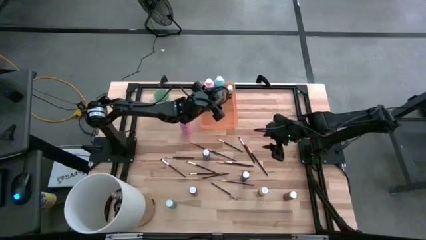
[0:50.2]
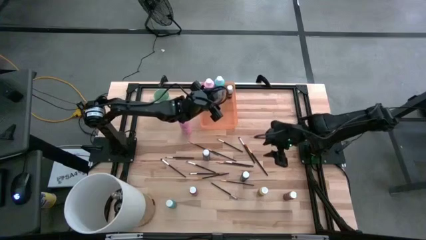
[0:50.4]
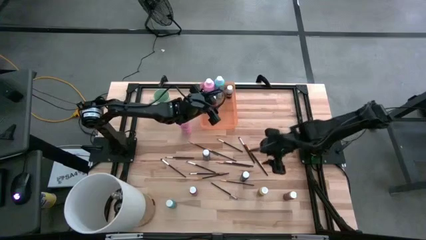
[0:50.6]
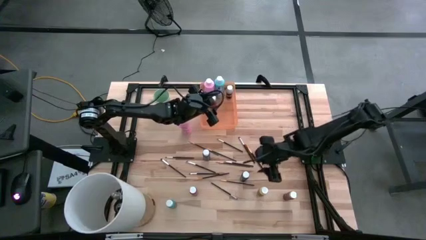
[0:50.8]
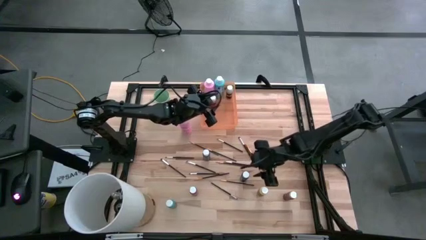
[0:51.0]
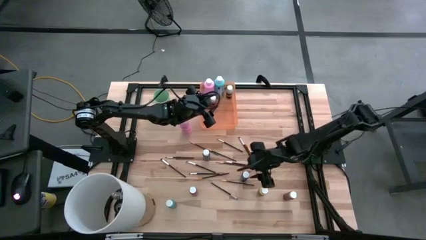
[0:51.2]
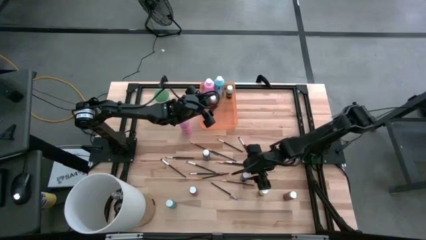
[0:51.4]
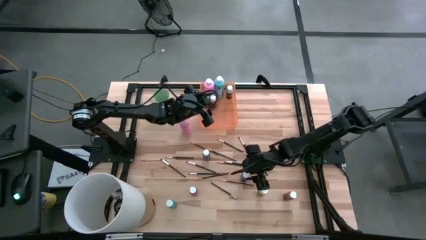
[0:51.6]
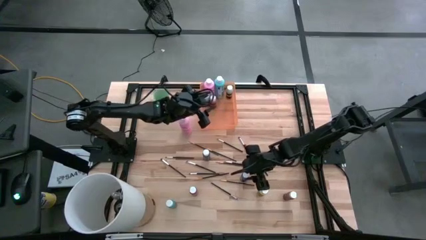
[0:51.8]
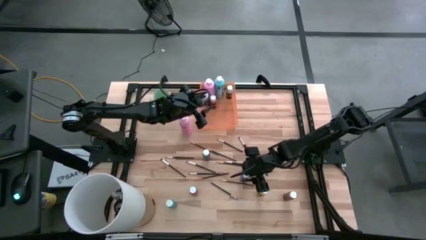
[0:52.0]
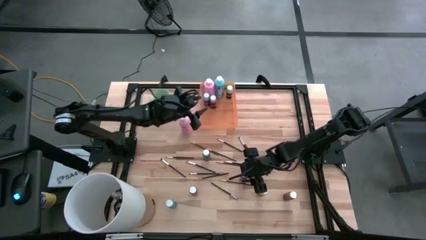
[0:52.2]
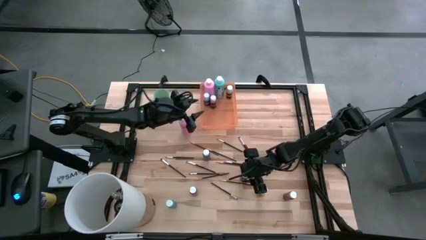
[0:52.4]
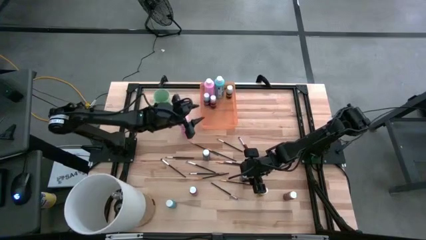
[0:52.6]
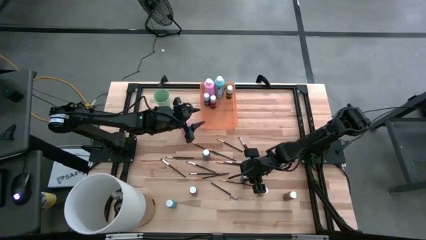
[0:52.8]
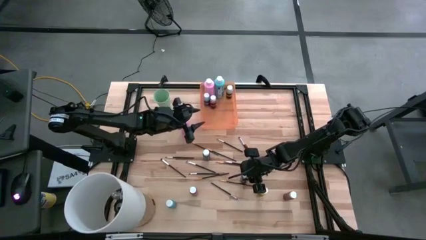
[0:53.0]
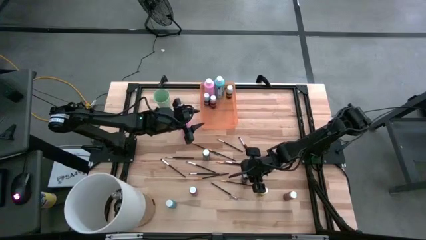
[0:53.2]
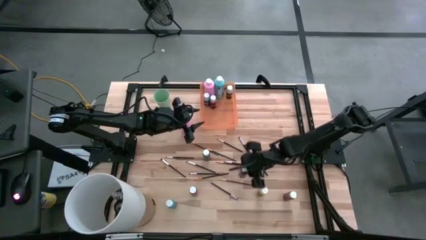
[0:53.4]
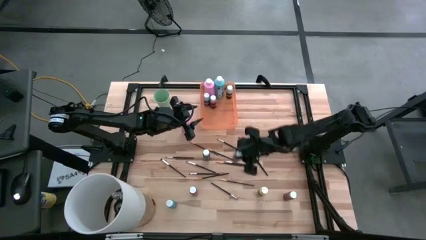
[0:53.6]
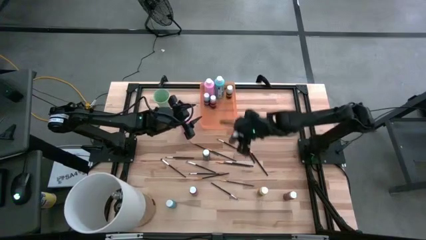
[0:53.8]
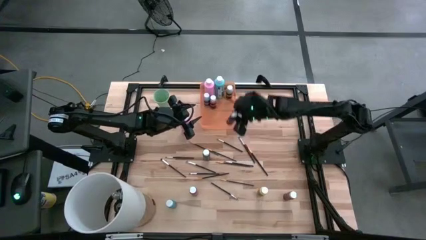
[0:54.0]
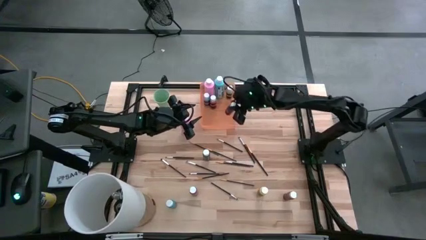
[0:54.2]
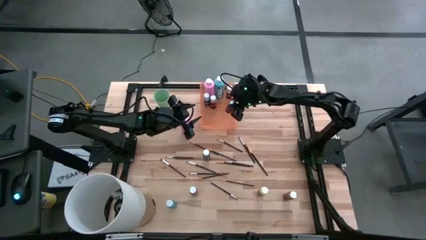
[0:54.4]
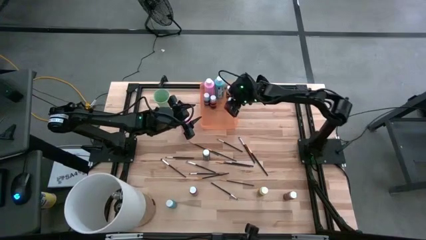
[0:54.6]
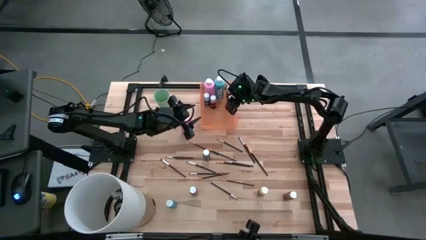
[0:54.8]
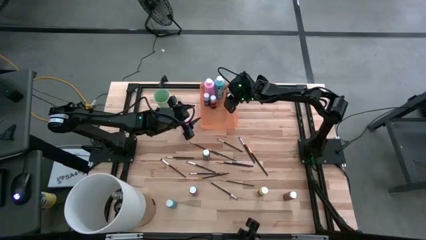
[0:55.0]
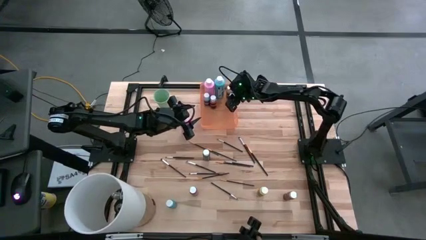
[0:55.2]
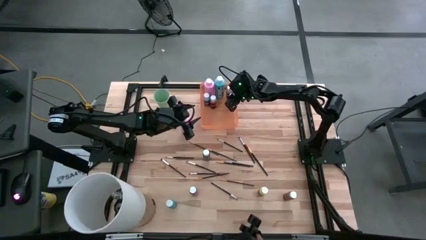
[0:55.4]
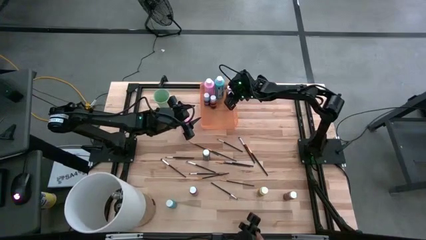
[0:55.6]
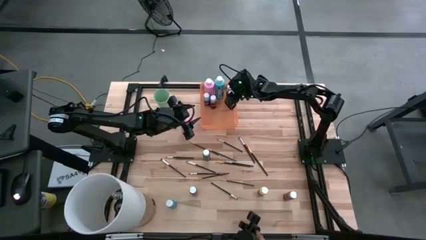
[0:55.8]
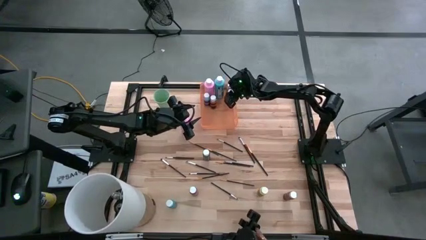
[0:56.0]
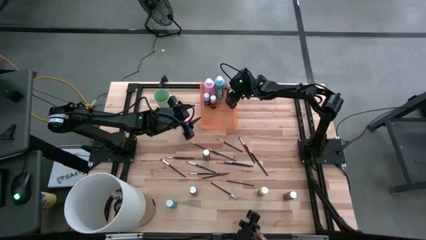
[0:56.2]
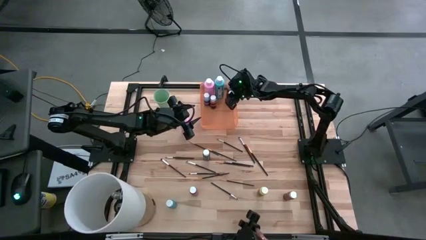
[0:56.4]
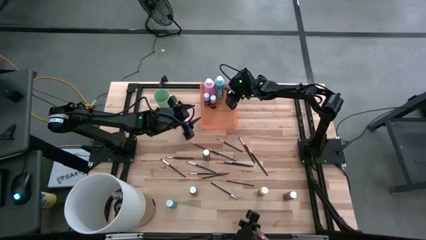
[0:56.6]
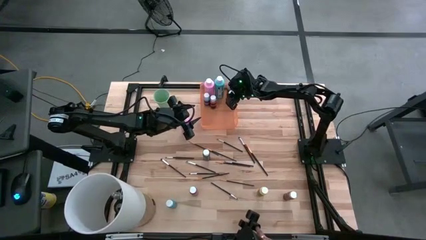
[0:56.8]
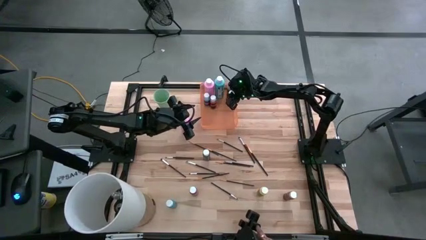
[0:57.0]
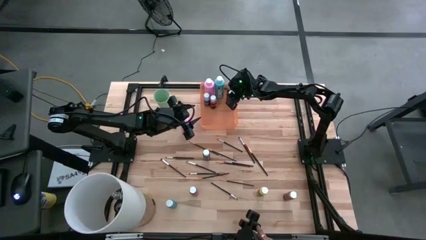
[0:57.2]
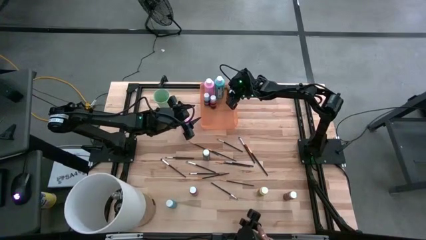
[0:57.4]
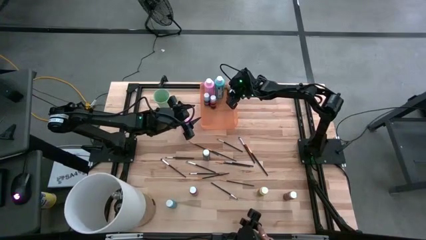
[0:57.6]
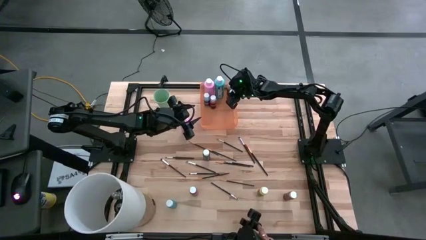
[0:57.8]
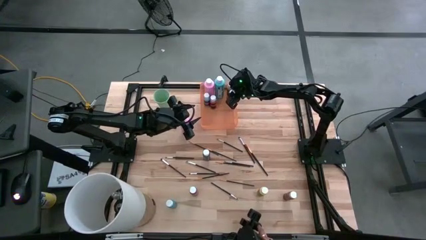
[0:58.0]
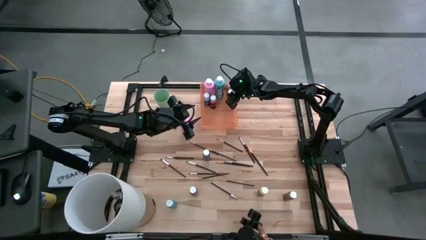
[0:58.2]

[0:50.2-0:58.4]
Task: Pick & Place Paint Supplies
Put the dark blue paint bottle into the orange bin

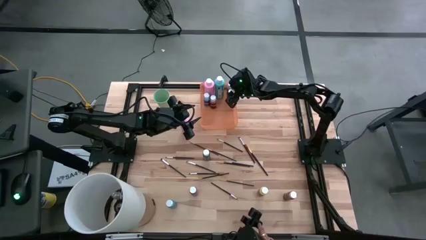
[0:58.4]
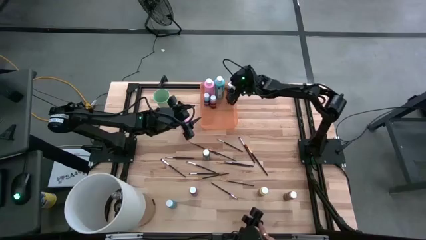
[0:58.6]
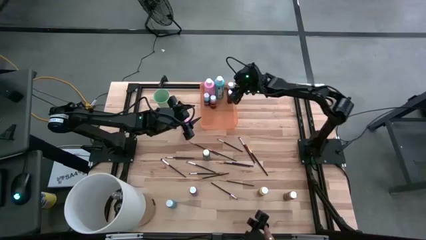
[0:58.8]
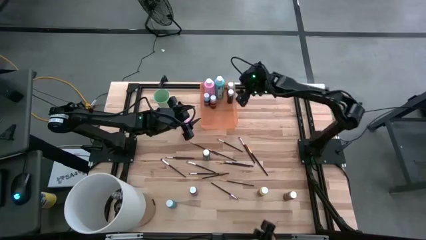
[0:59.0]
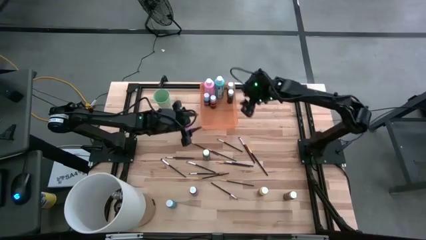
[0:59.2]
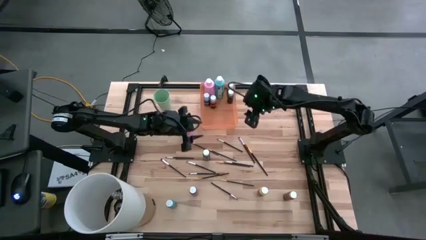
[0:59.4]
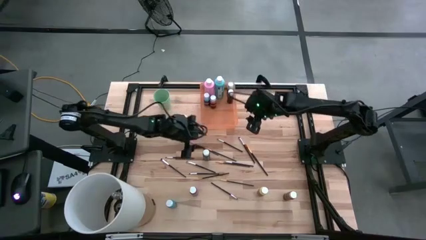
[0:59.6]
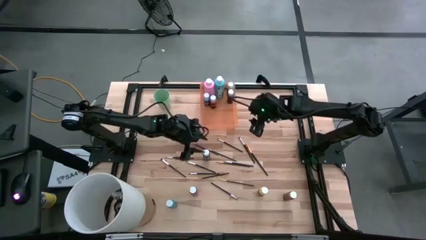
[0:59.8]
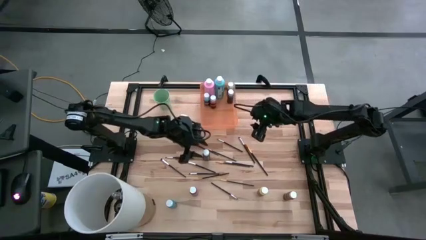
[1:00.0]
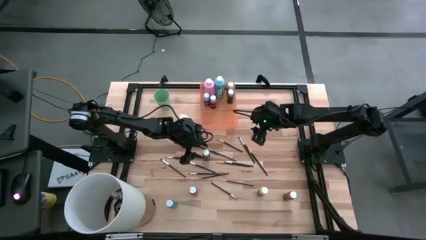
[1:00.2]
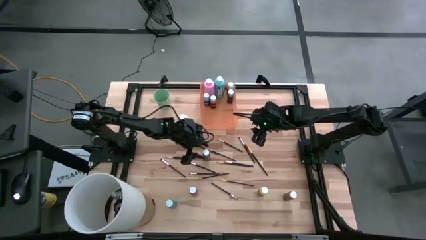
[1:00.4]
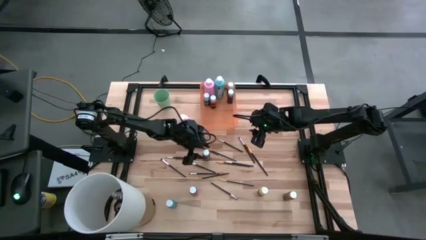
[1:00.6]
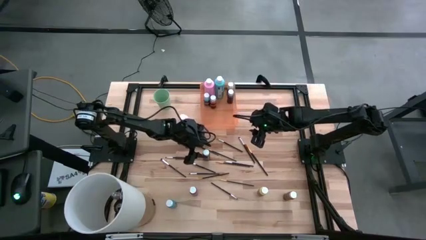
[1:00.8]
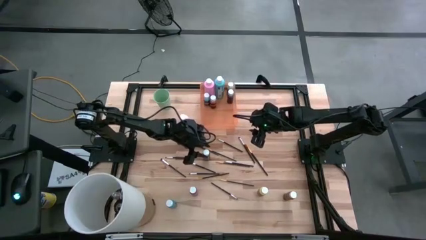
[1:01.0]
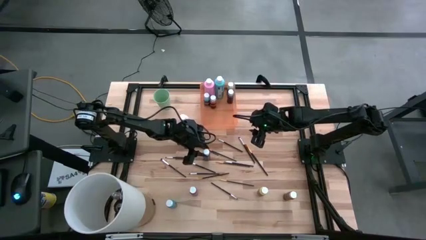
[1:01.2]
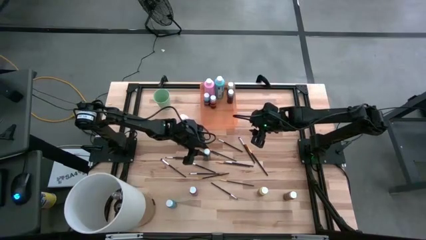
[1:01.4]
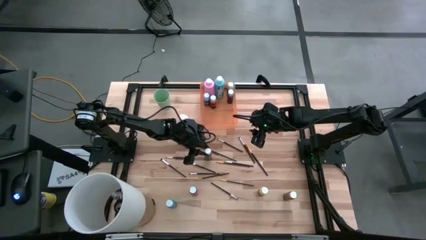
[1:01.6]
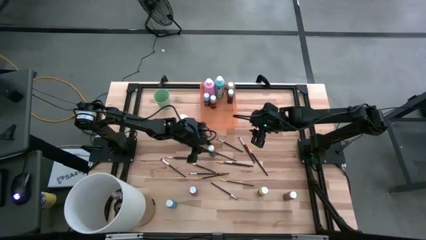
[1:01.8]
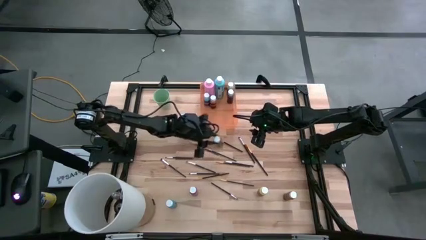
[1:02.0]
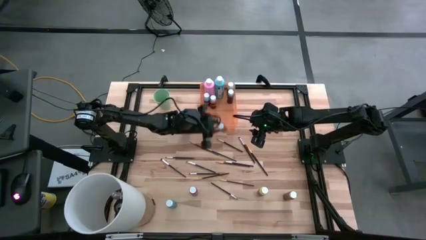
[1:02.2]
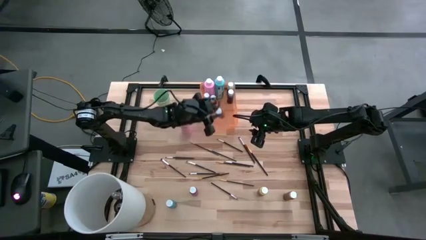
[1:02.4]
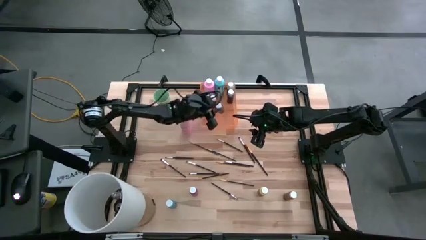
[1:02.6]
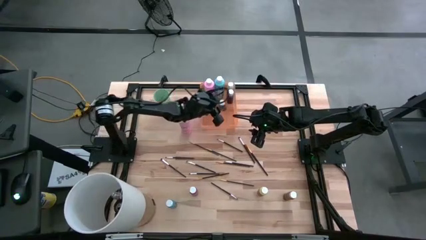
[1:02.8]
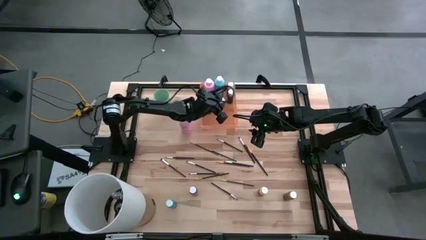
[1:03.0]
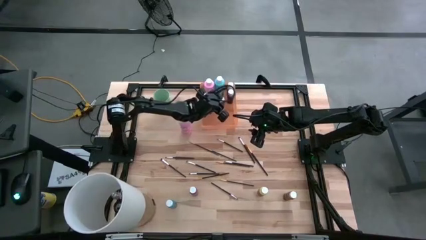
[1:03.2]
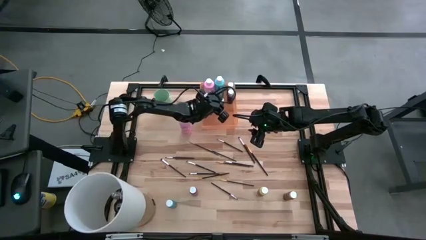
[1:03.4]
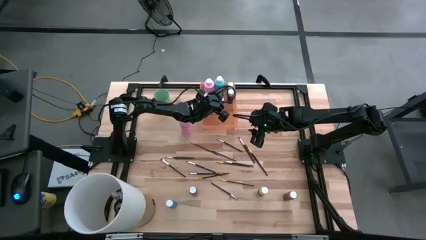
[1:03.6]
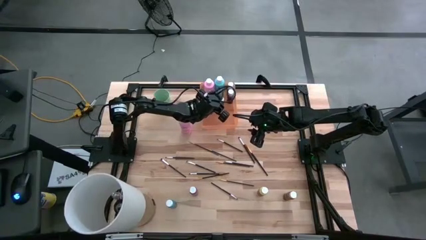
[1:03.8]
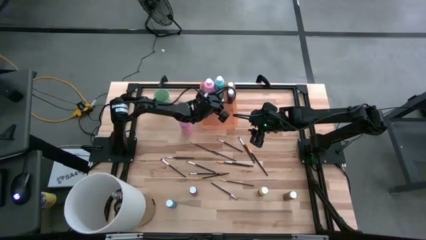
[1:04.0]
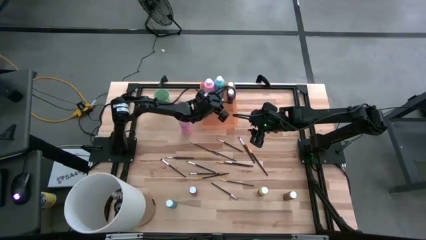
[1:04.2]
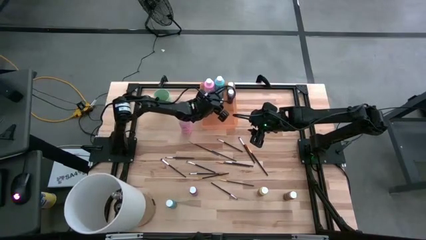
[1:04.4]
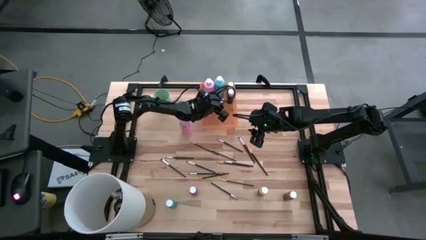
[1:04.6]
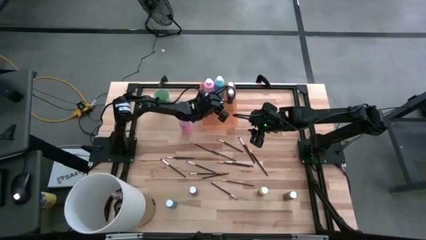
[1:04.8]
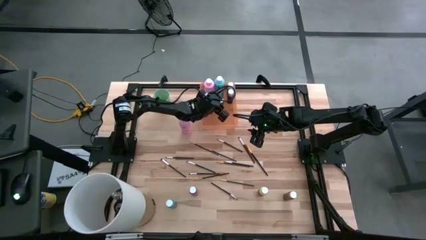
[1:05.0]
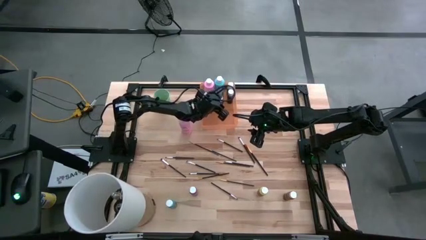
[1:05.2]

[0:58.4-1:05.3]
Put the black paint bottle into the orange bin
